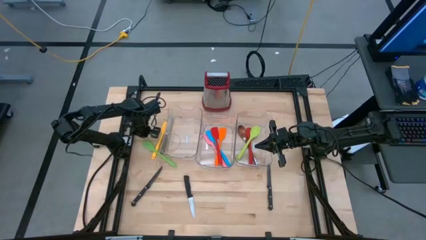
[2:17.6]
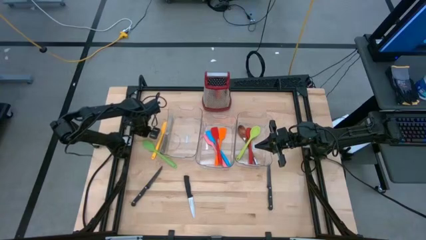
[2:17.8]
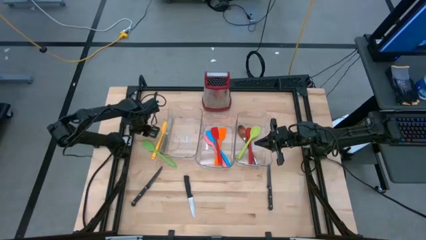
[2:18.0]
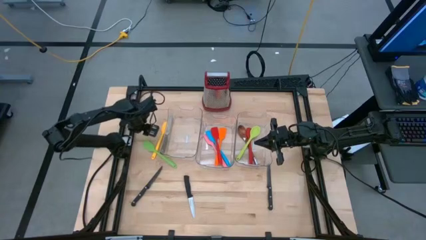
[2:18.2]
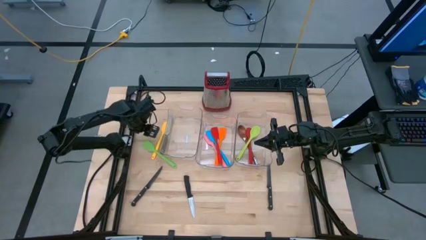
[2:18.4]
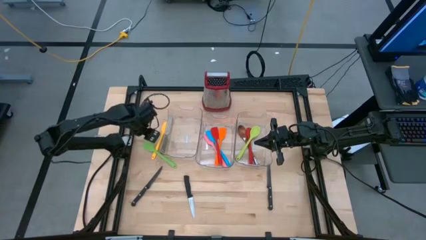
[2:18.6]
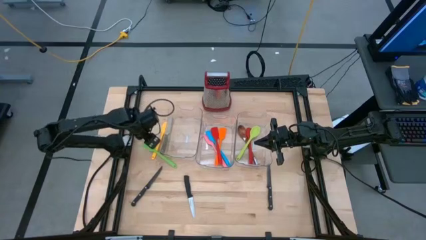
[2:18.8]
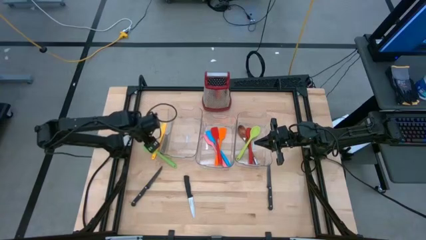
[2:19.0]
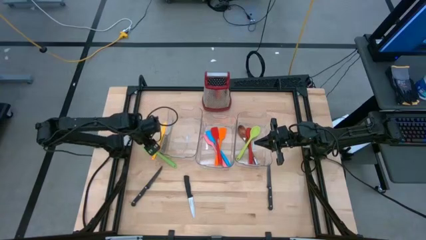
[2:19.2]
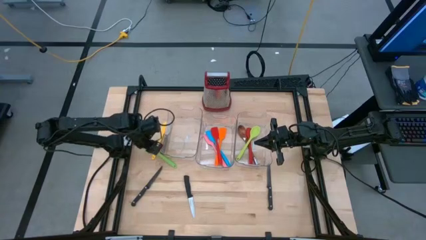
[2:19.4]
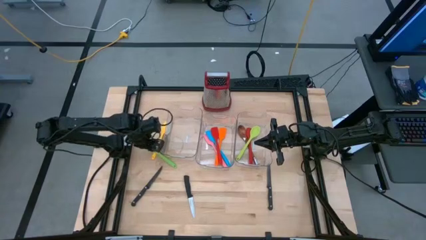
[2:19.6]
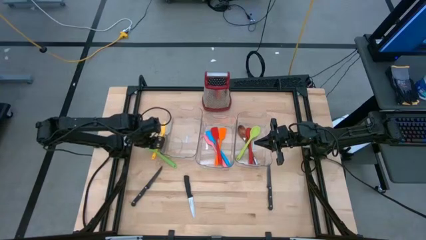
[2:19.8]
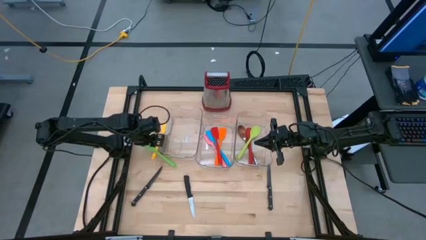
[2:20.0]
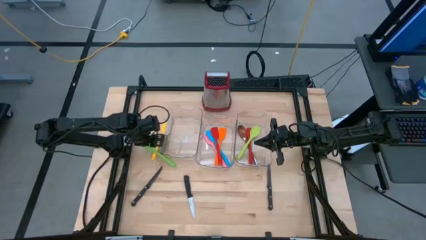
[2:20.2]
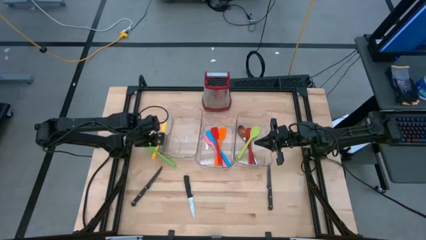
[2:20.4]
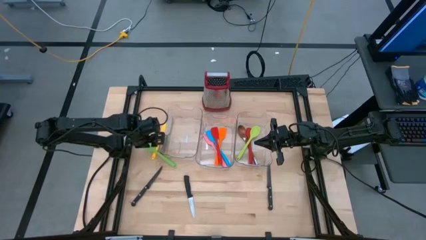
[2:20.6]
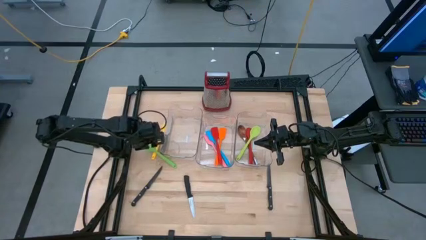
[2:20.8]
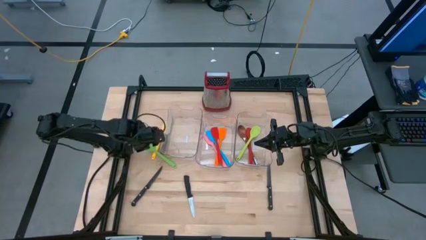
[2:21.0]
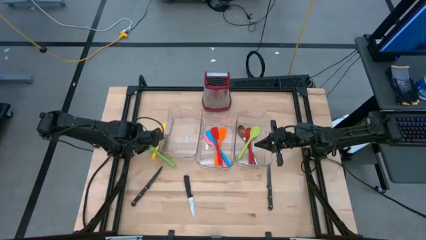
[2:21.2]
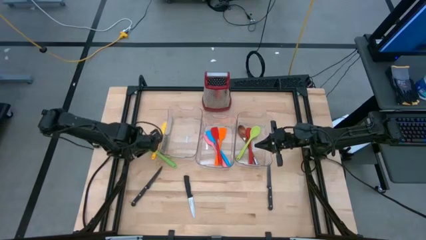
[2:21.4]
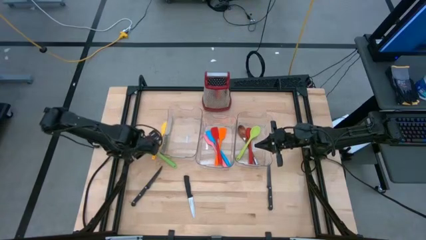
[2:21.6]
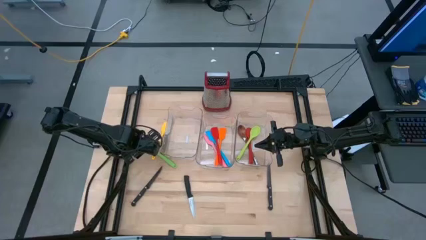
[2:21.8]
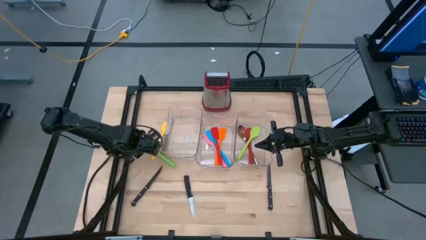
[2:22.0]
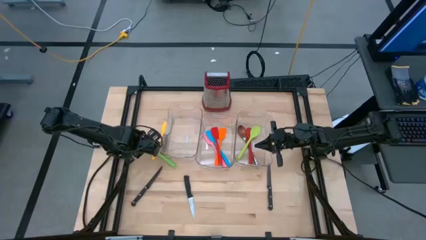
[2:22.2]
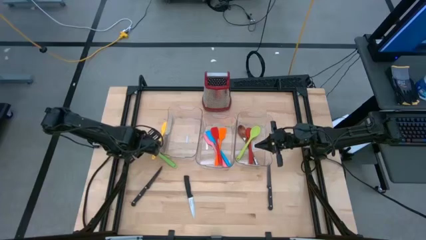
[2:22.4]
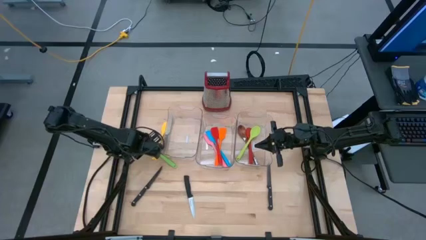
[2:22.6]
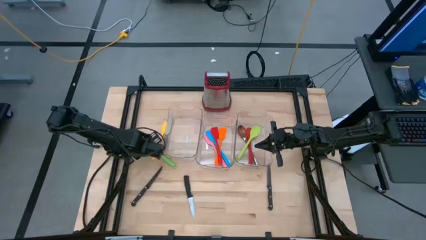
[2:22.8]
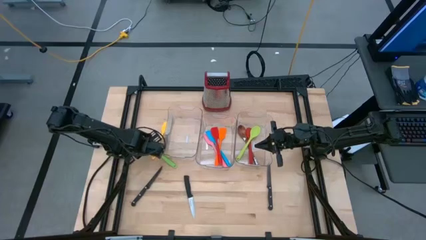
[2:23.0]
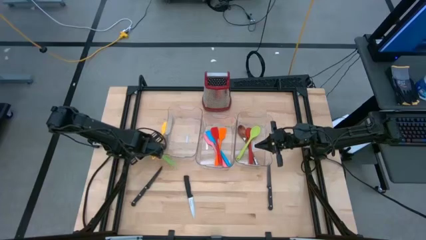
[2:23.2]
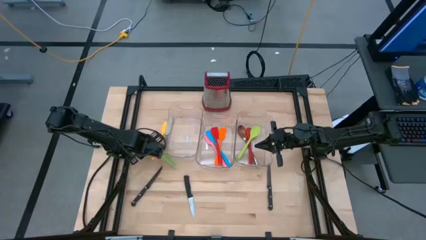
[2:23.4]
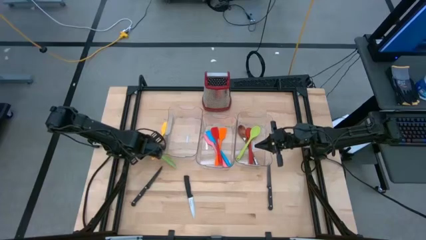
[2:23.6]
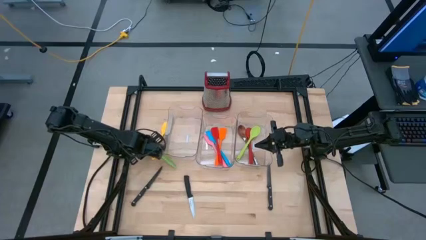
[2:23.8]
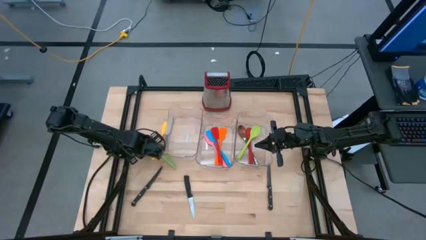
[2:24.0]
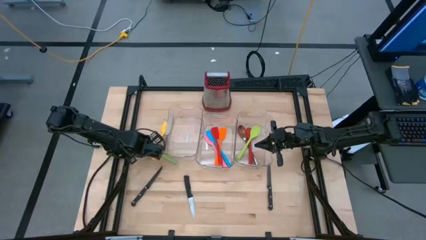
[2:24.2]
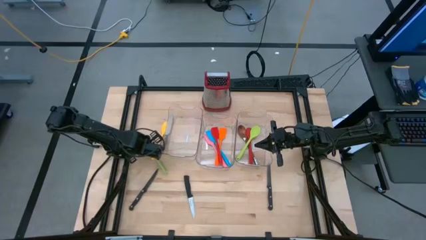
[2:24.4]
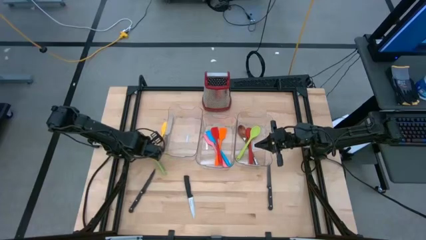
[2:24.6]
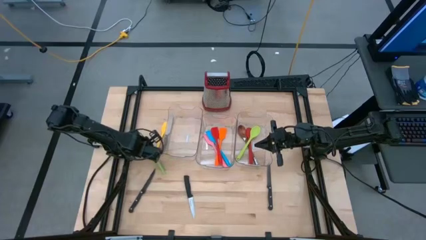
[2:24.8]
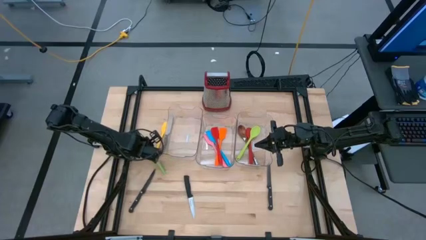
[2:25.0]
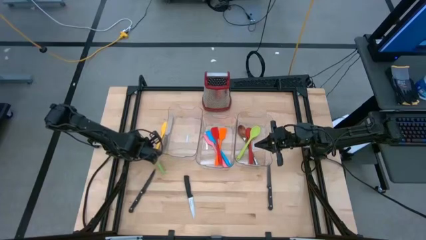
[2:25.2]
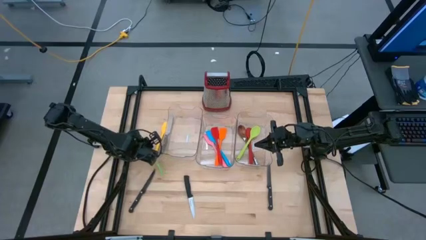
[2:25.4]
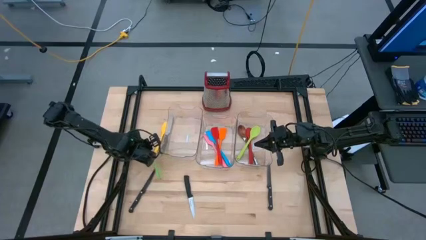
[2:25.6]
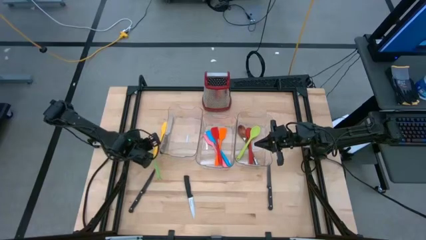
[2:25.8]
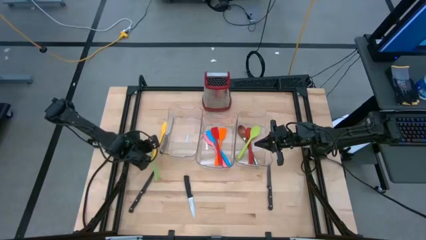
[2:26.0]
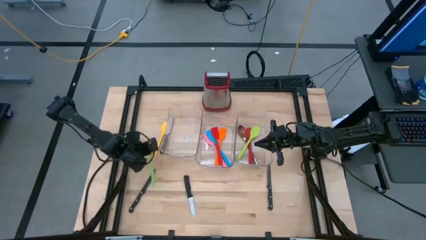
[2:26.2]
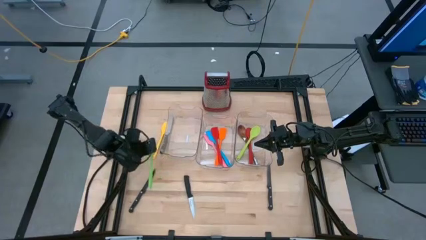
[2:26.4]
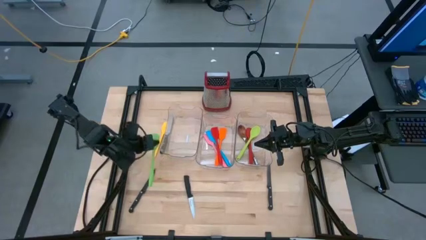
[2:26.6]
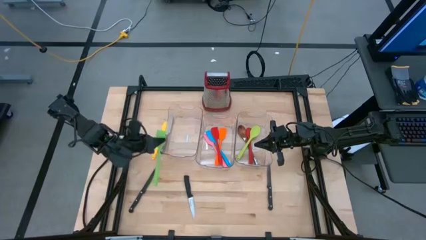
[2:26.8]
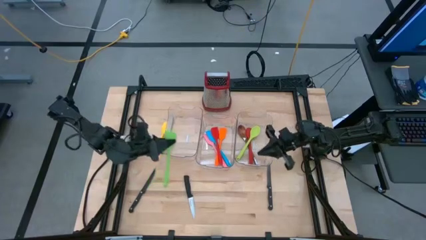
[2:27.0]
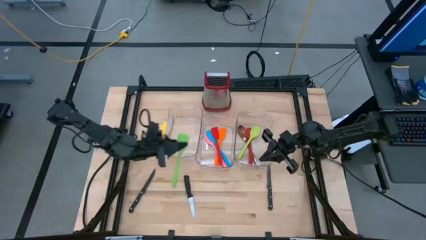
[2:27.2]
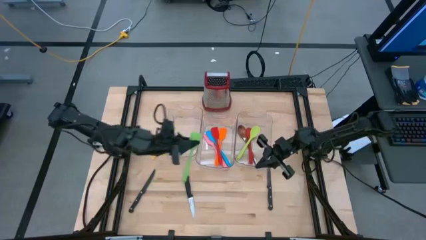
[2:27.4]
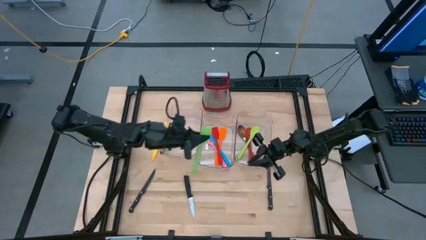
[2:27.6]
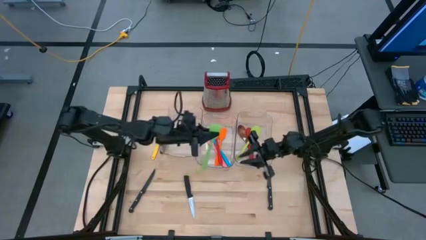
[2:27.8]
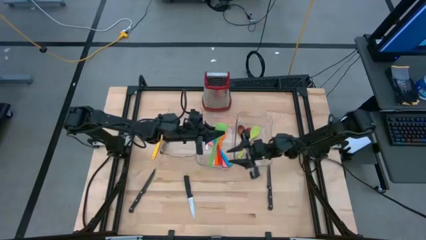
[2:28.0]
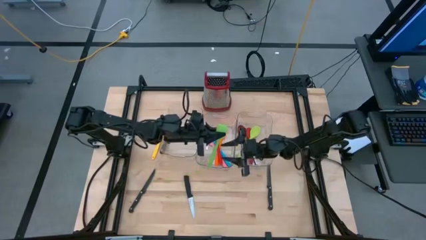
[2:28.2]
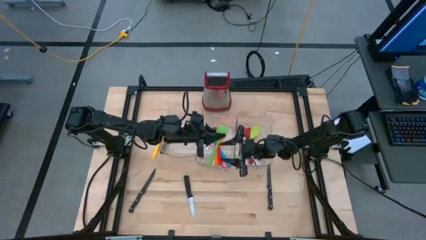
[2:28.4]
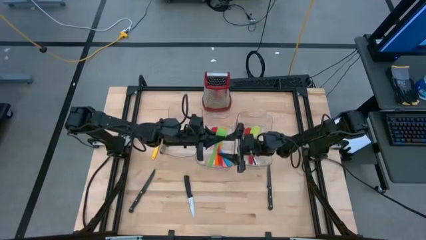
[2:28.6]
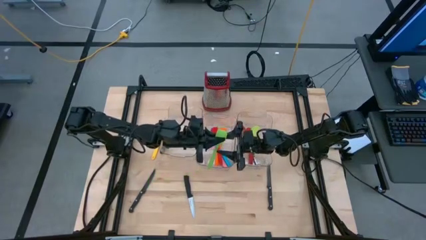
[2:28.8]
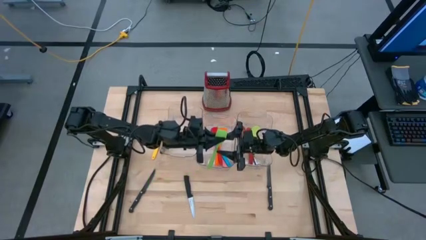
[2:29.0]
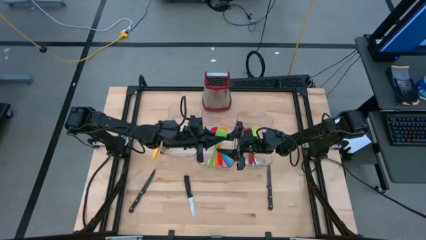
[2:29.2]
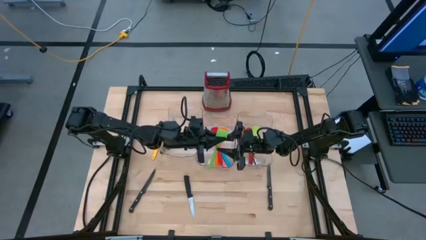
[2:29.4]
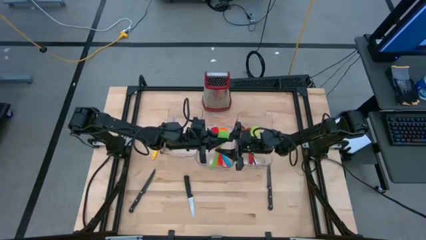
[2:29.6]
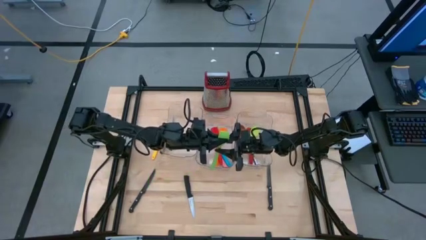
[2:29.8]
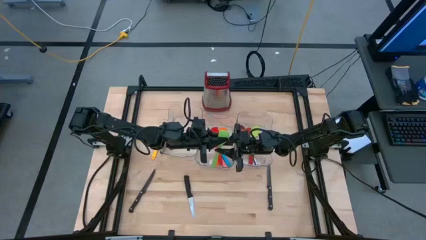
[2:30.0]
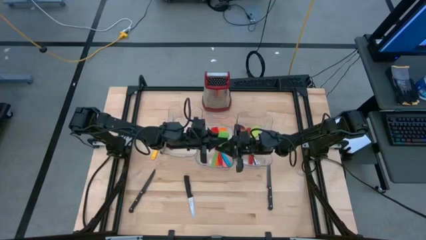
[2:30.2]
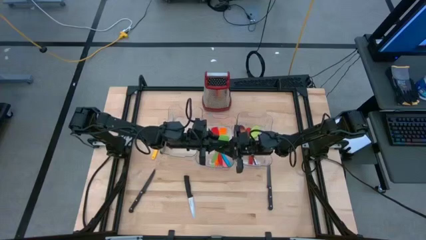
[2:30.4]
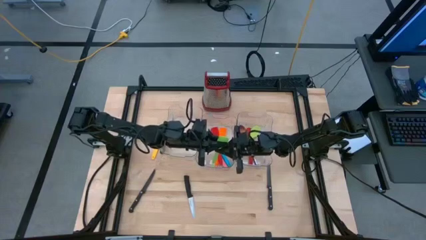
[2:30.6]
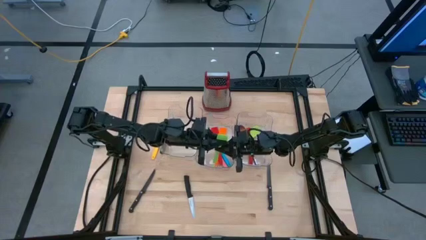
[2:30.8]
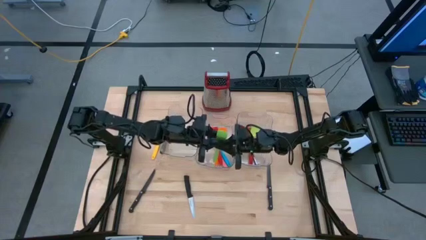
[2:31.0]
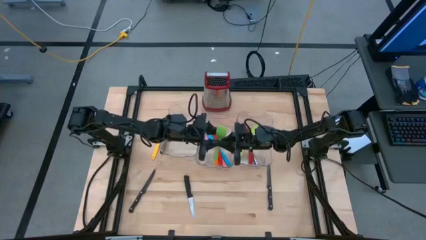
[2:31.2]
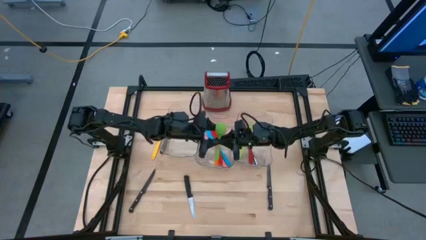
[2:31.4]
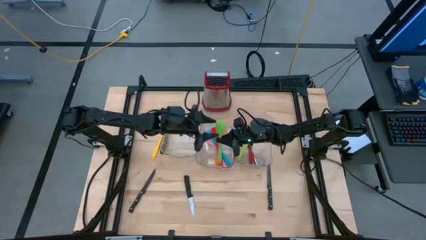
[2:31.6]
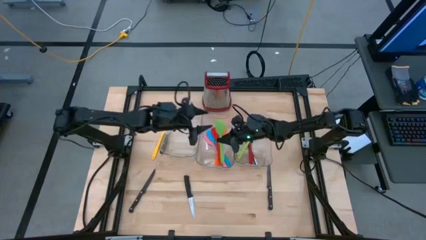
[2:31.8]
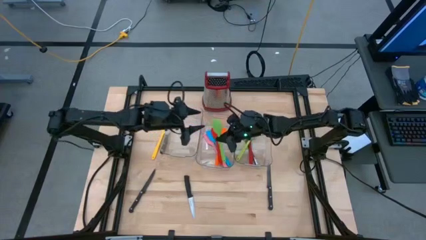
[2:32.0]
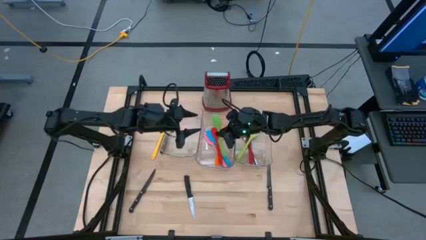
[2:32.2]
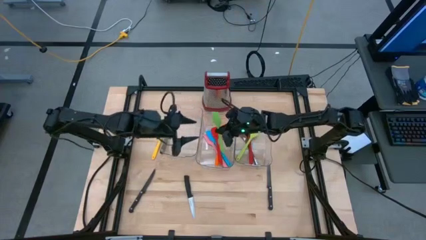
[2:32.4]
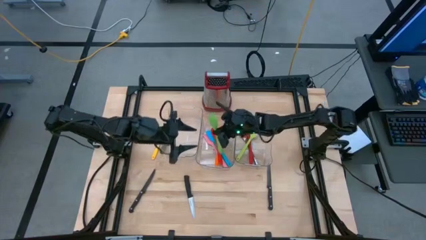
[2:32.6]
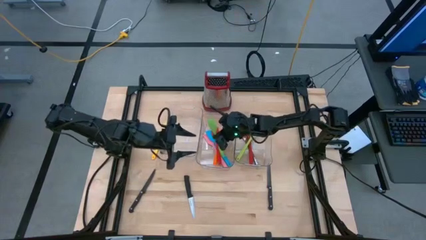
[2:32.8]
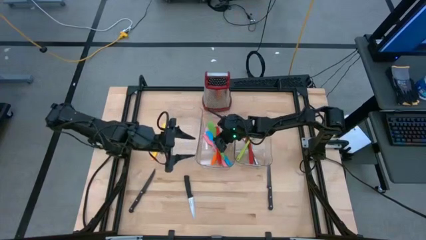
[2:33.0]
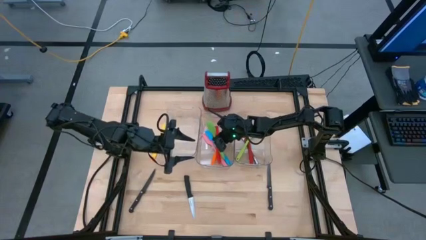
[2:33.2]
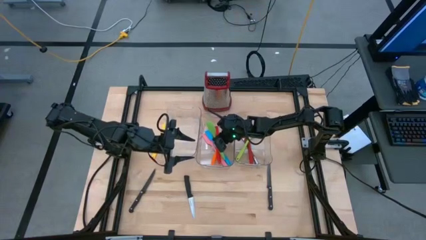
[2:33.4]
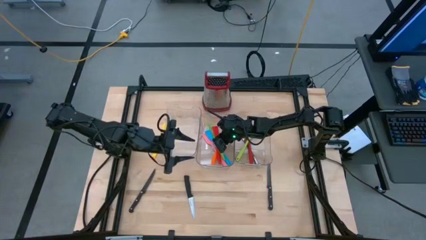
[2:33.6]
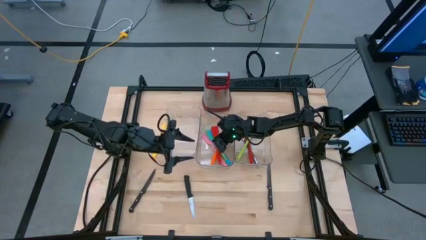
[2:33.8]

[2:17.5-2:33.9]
Task: Pick & Place Kitchen Items
Put the green spatula into the middle transparent bin
